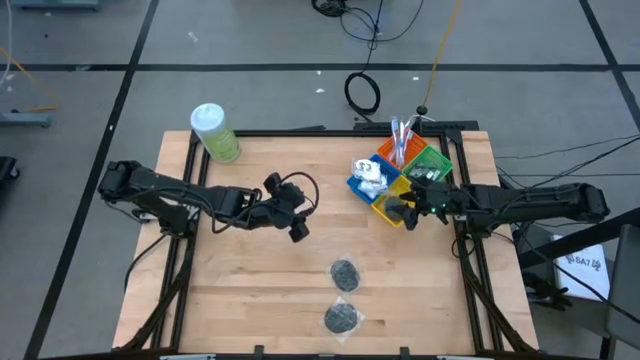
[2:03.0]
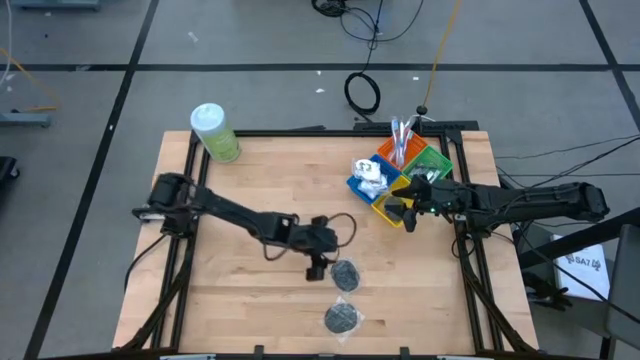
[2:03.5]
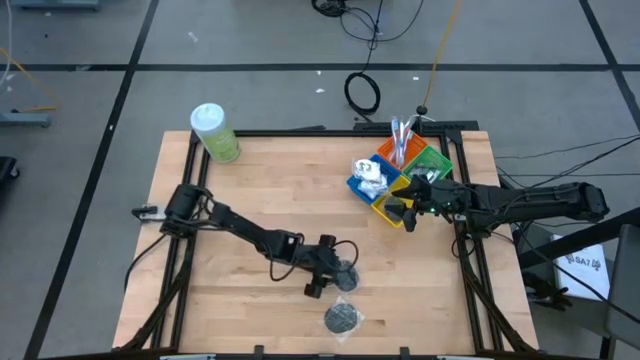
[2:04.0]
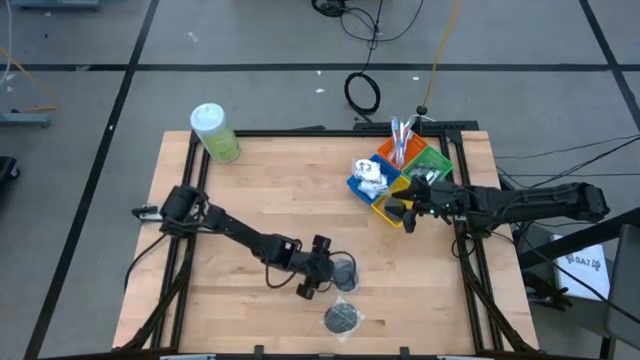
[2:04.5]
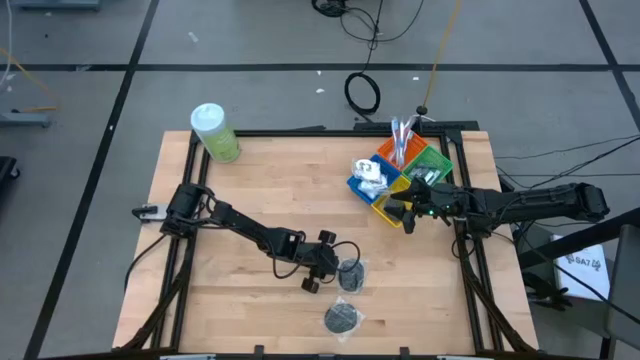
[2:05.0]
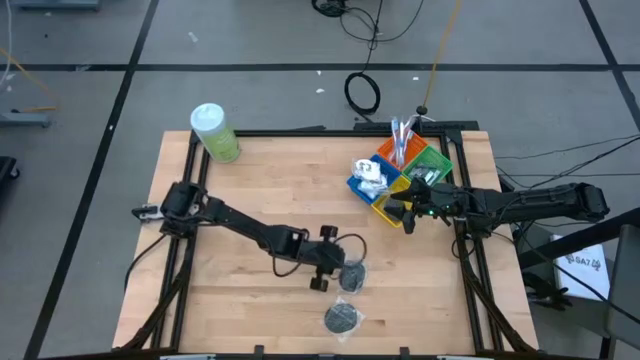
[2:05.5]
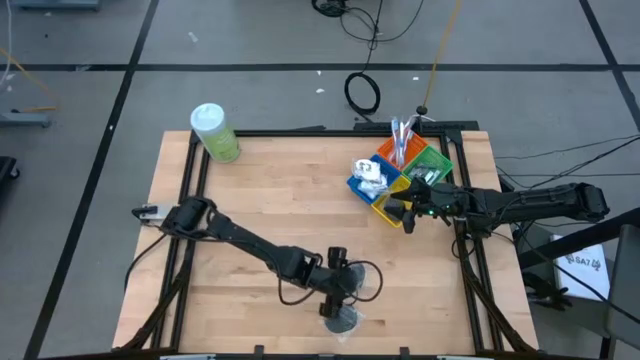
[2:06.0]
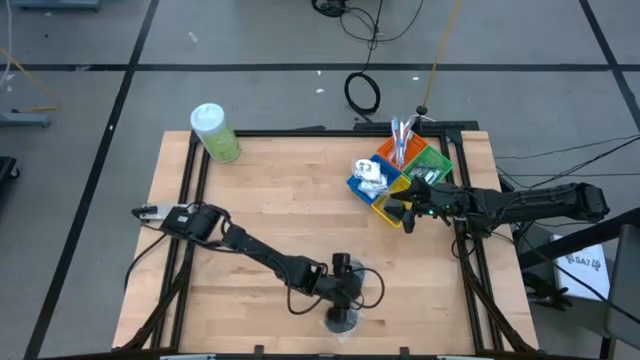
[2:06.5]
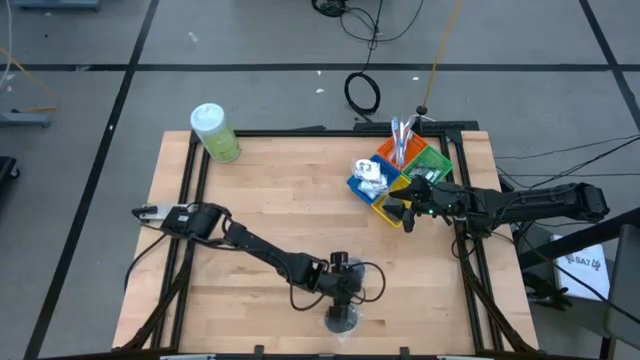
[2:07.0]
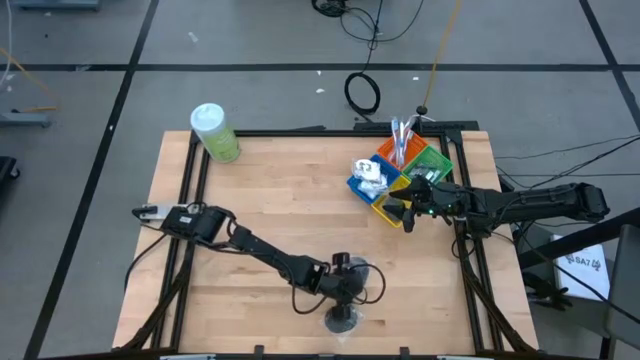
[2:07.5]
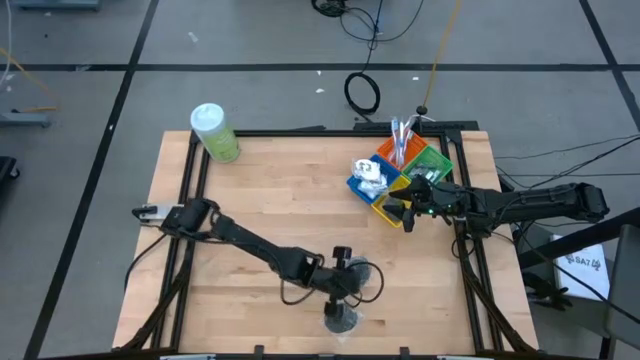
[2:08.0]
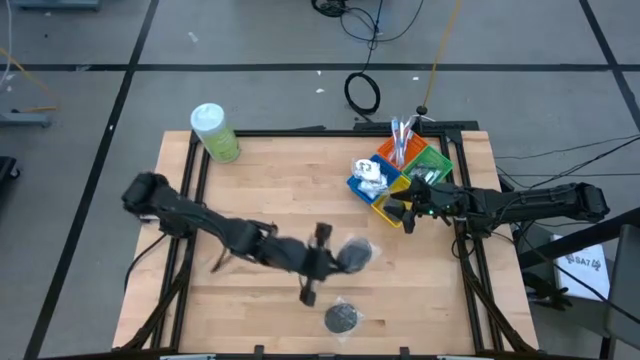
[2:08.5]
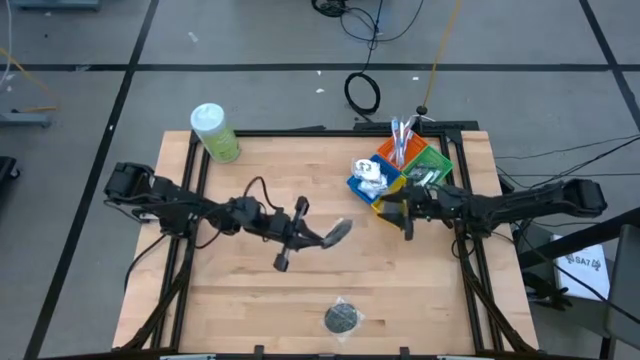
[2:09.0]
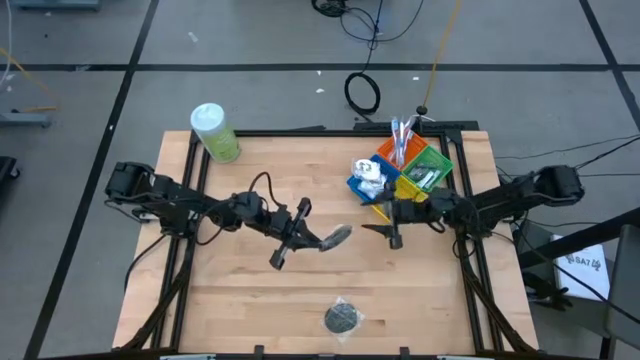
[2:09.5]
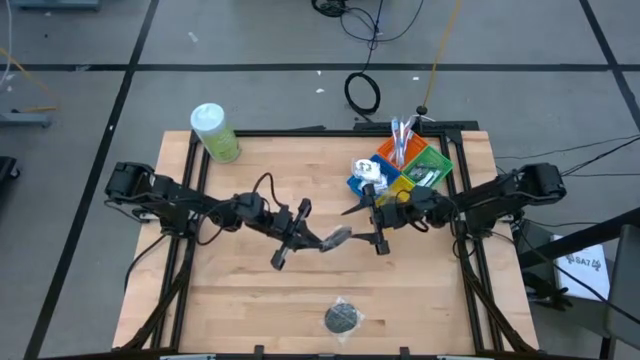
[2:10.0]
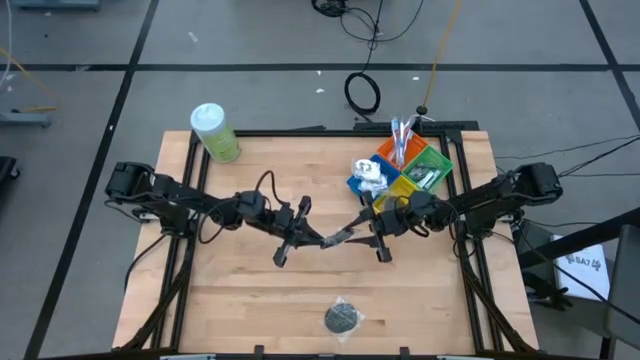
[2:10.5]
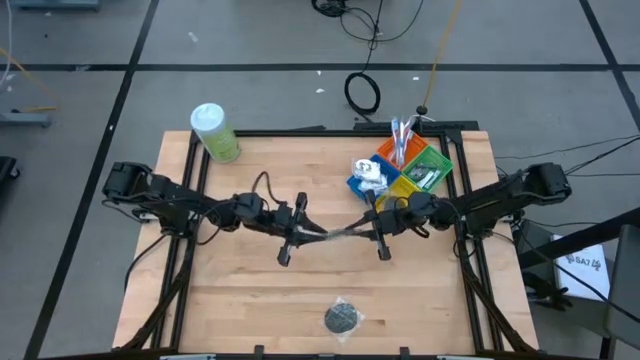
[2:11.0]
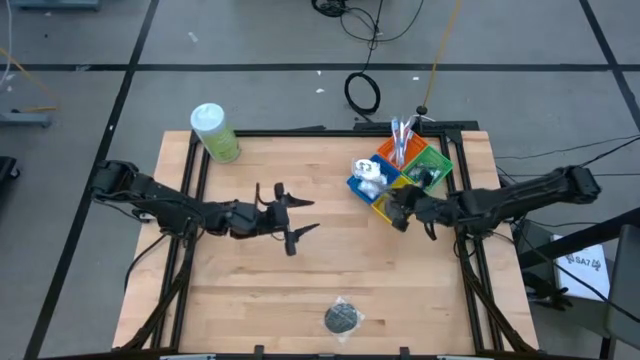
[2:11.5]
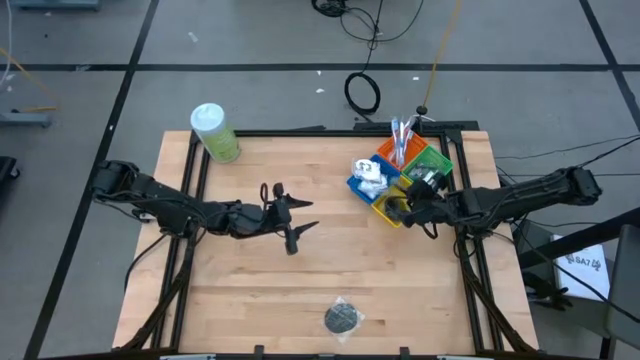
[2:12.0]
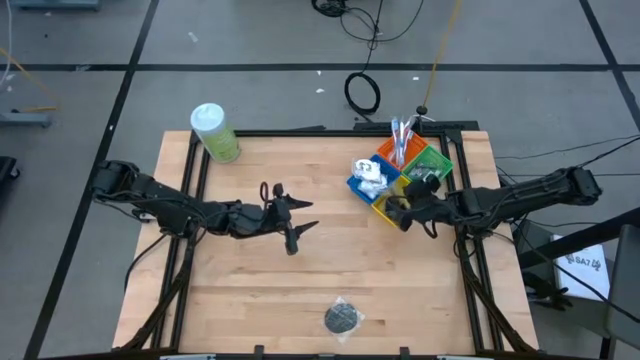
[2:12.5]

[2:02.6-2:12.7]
Task: Pick & Place Travel size toiletries
Put the black hairbrush into the yellow bin

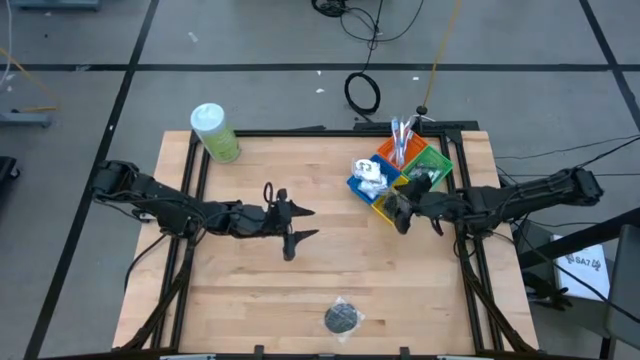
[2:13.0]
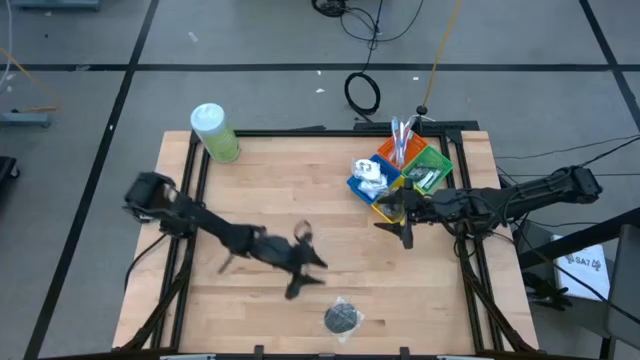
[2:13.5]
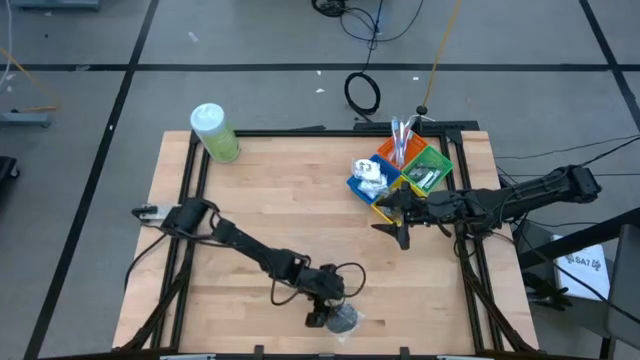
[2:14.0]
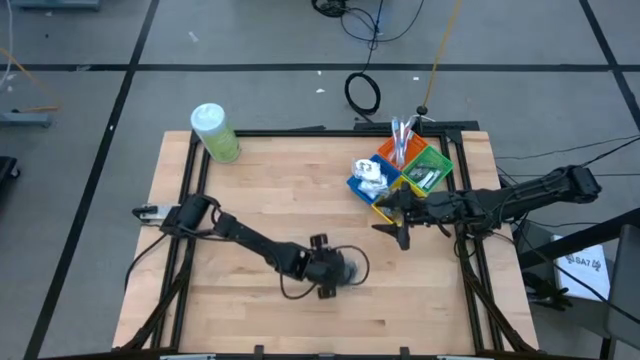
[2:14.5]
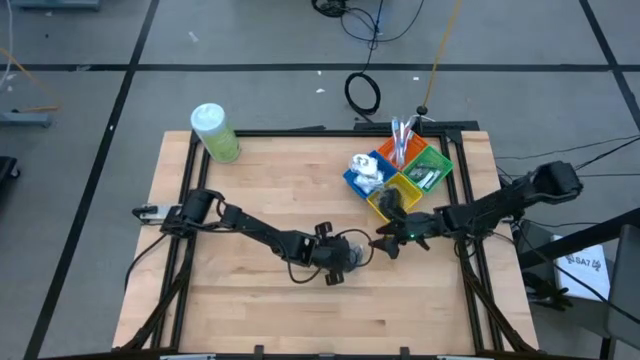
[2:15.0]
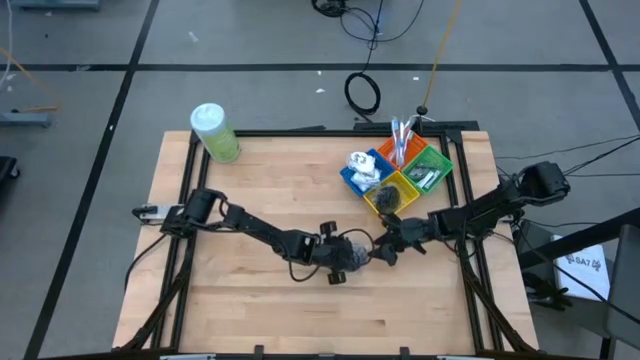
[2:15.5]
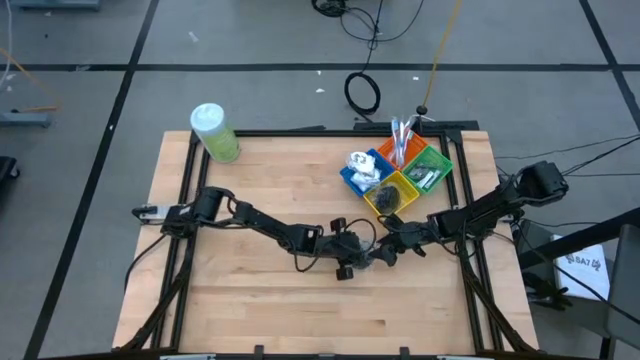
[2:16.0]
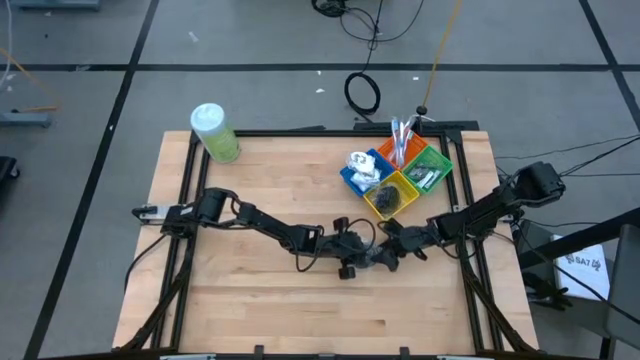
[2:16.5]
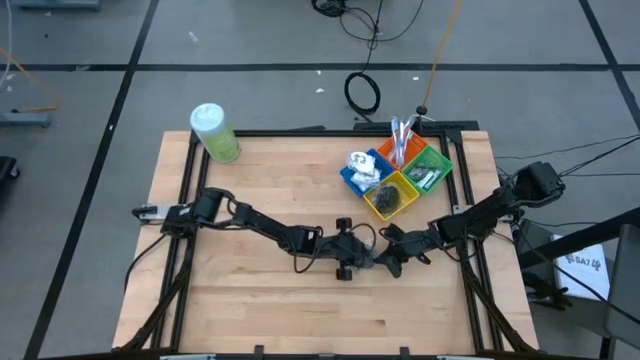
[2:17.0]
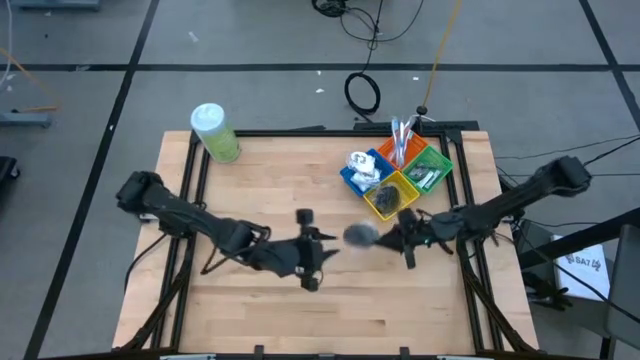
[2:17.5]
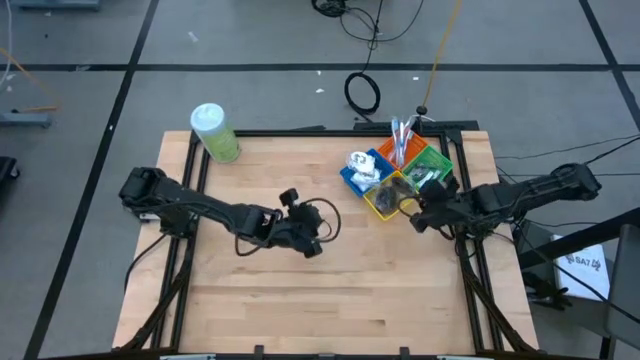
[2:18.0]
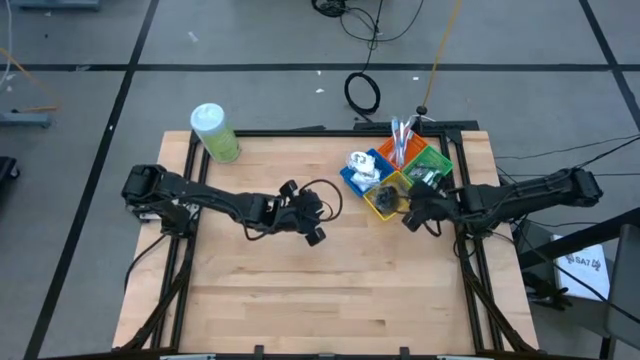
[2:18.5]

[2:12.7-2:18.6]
Put the black hairbrush into the yellow bin

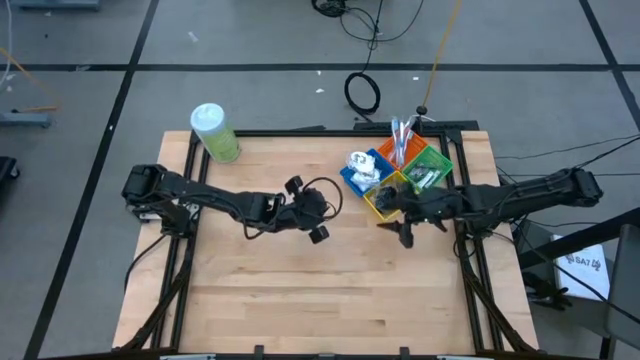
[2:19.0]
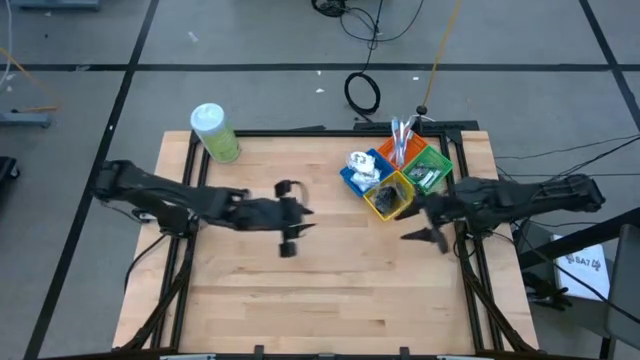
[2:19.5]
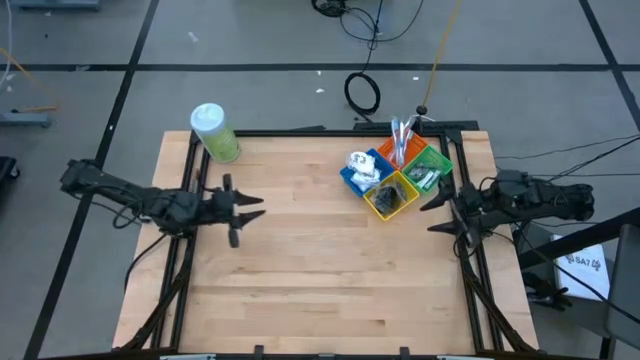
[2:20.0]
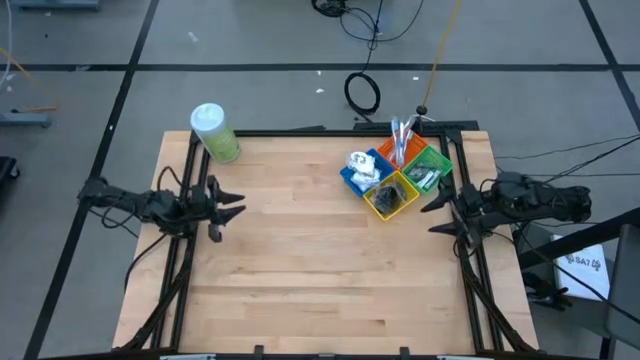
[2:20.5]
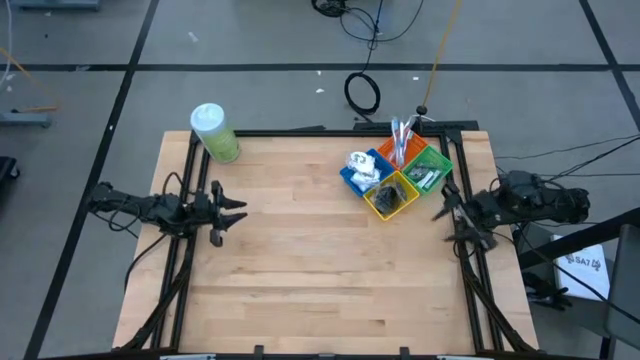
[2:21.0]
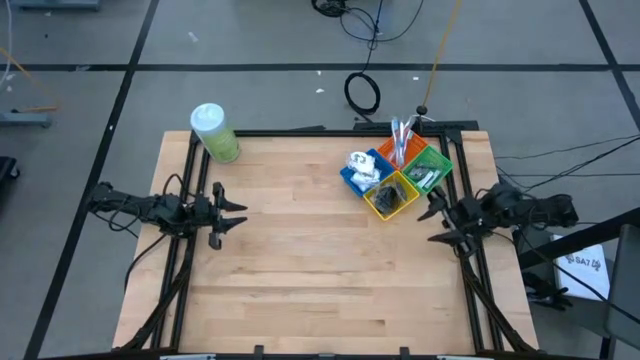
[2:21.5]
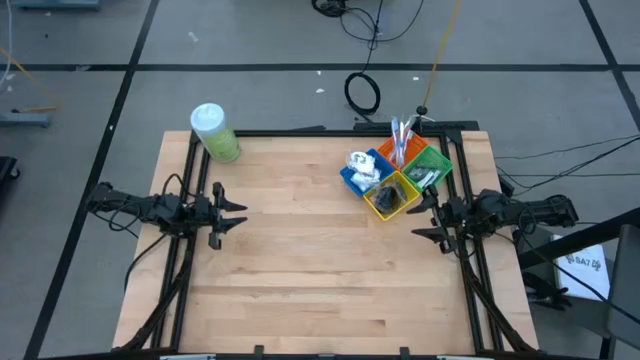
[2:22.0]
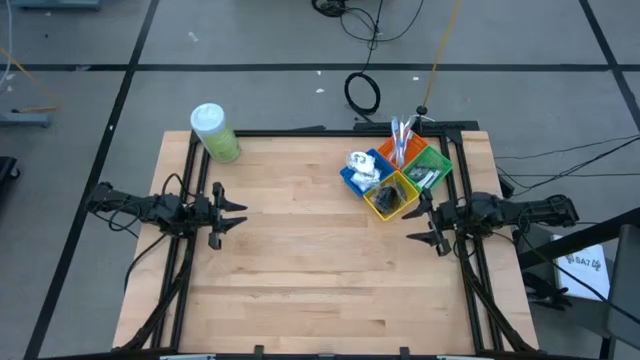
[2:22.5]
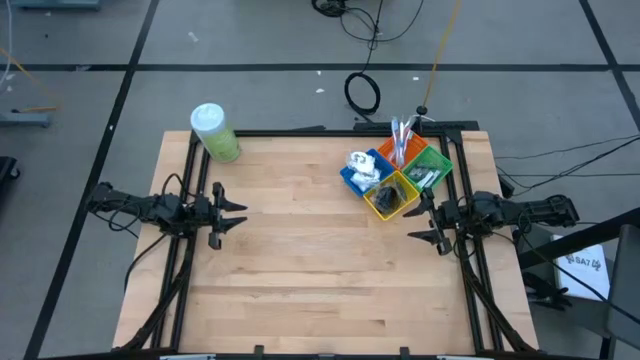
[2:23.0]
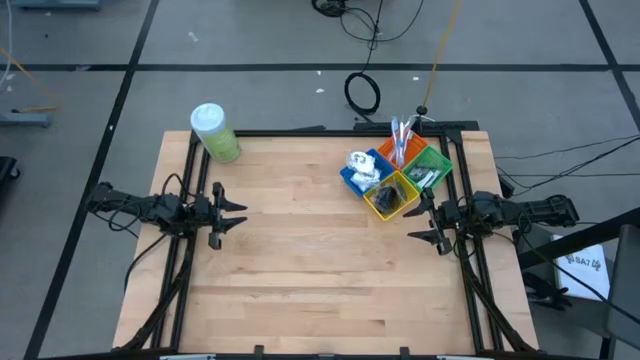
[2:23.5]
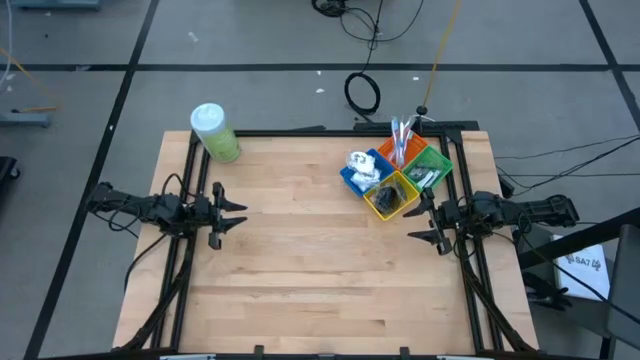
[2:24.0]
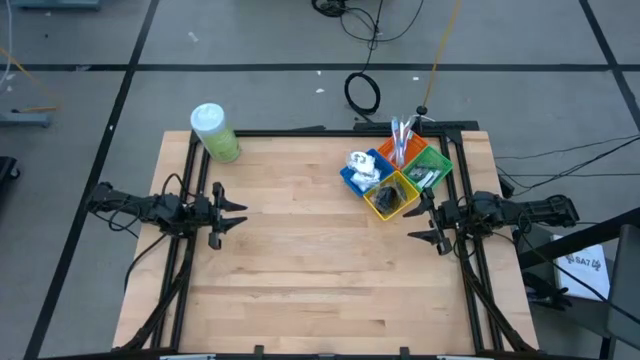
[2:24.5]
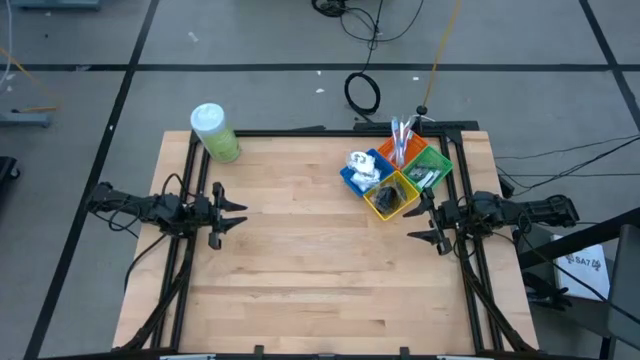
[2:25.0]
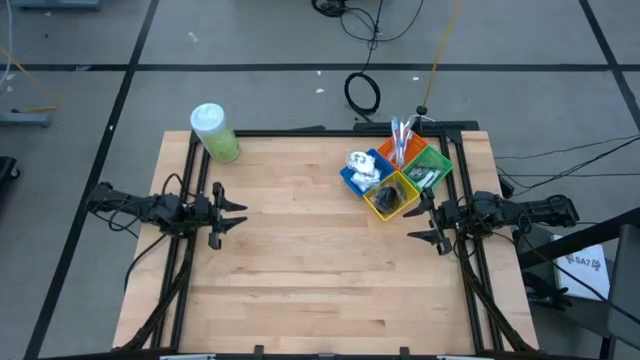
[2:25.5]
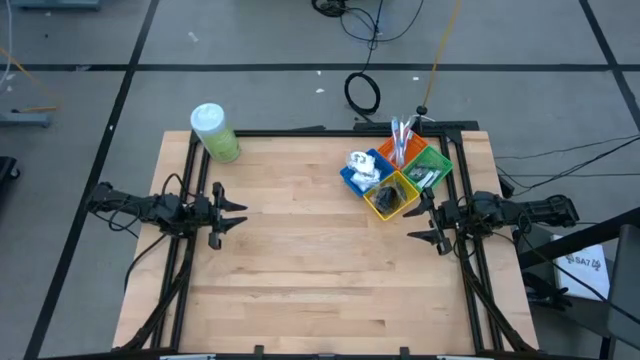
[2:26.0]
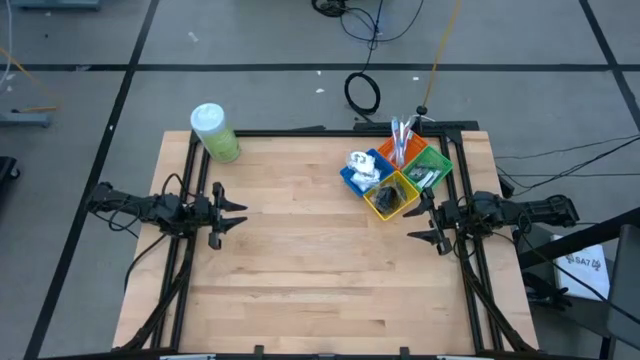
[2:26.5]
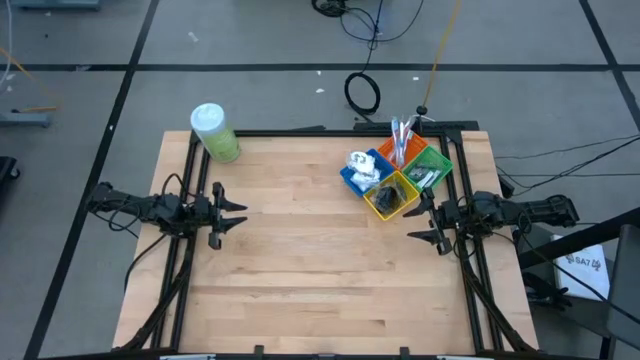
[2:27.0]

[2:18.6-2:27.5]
Return to Home Position
